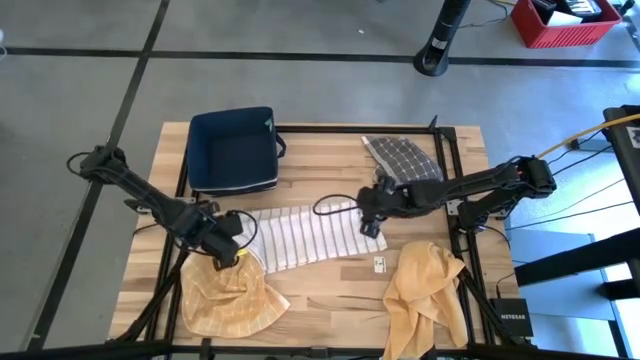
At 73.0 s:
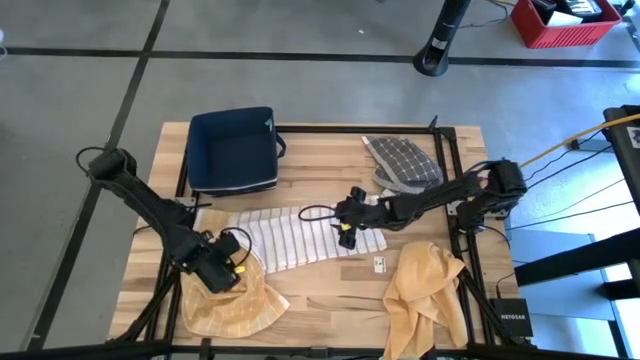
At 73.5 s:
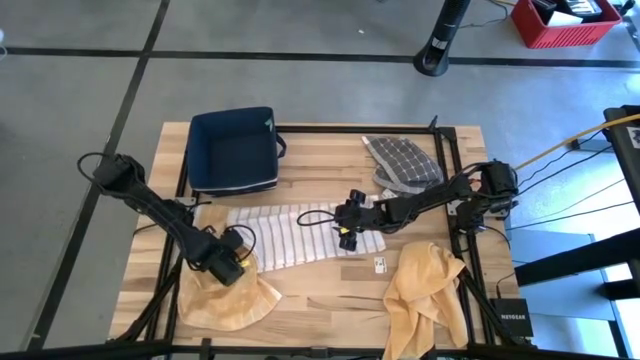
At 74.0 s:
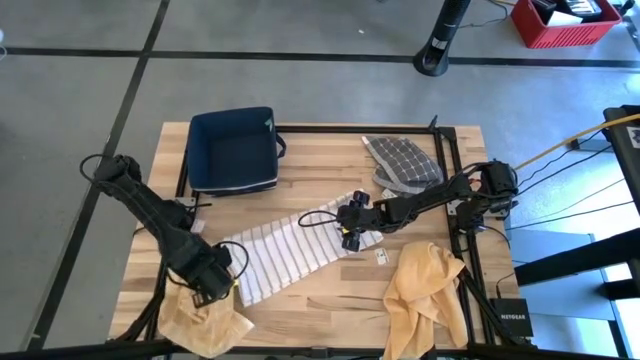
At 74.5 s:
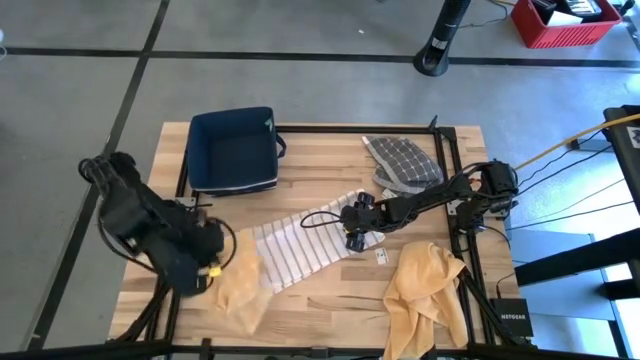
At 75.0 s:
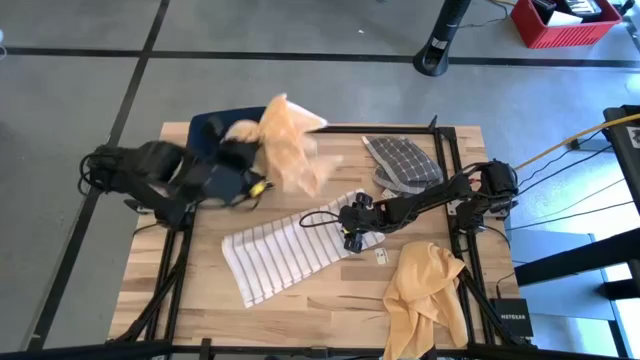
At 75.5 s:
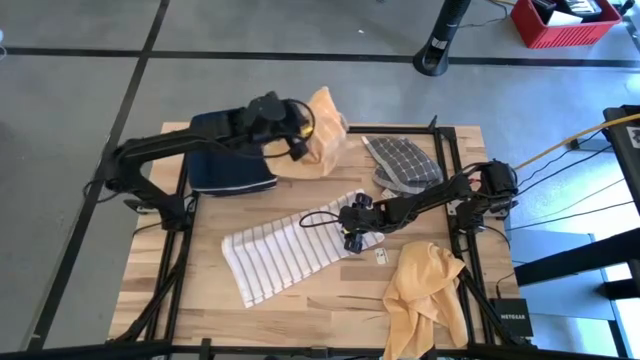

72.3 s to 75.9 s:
Task: Fold towel
Move the orange pattern towel to the top center of the table

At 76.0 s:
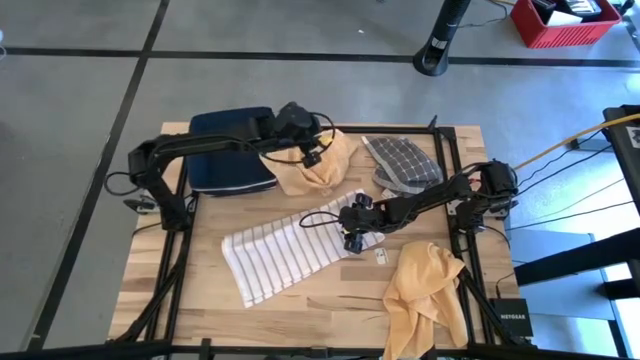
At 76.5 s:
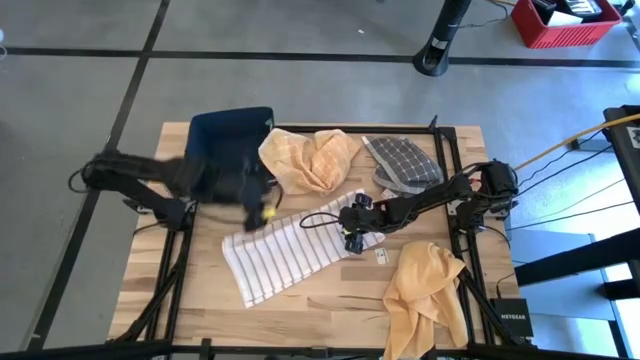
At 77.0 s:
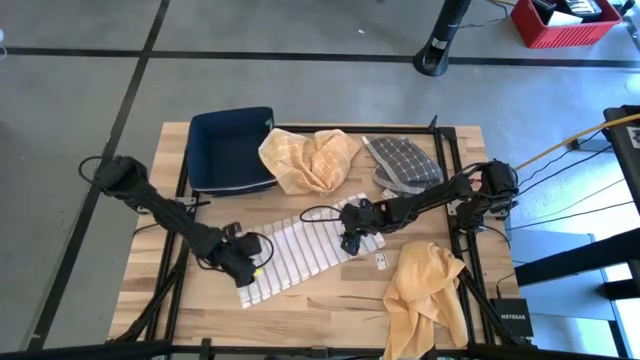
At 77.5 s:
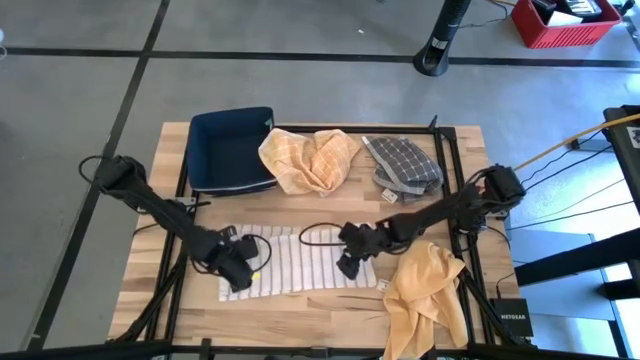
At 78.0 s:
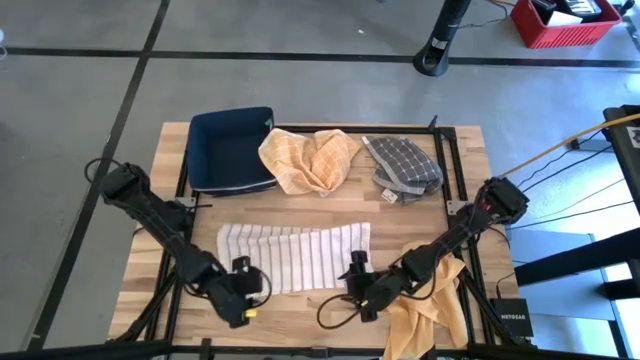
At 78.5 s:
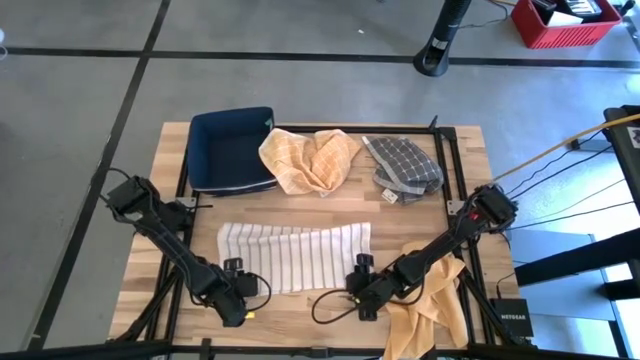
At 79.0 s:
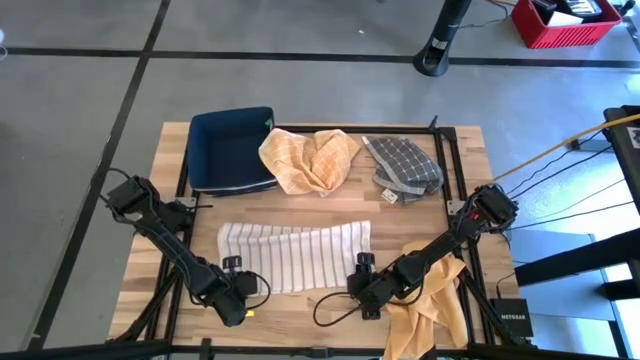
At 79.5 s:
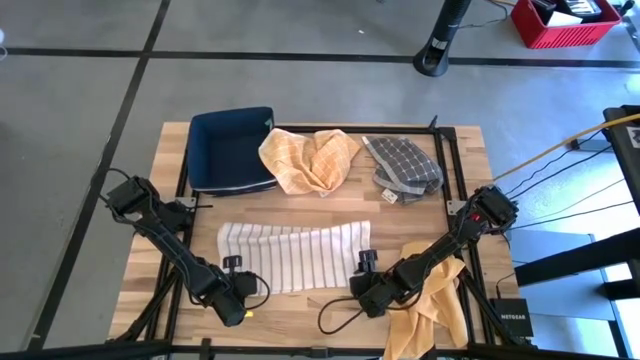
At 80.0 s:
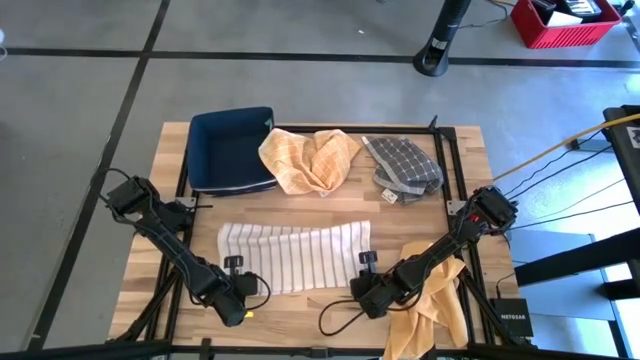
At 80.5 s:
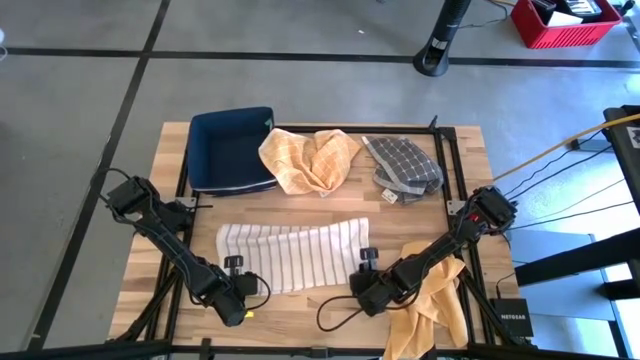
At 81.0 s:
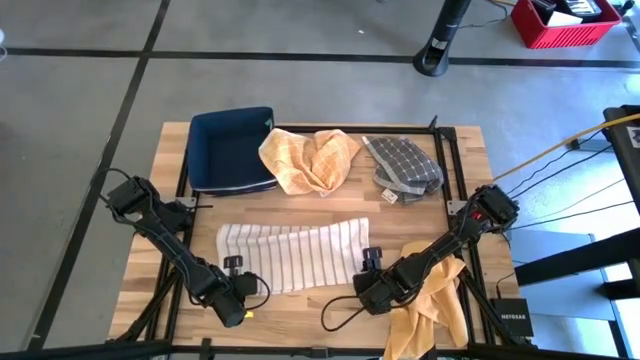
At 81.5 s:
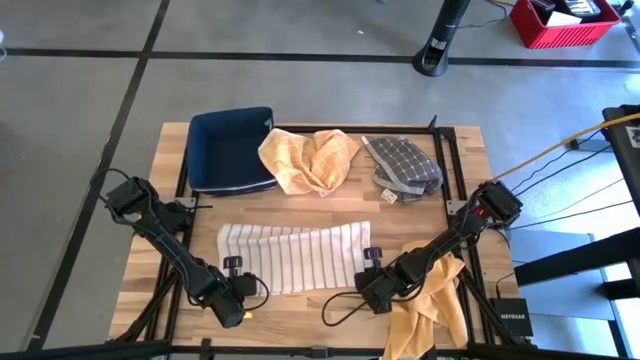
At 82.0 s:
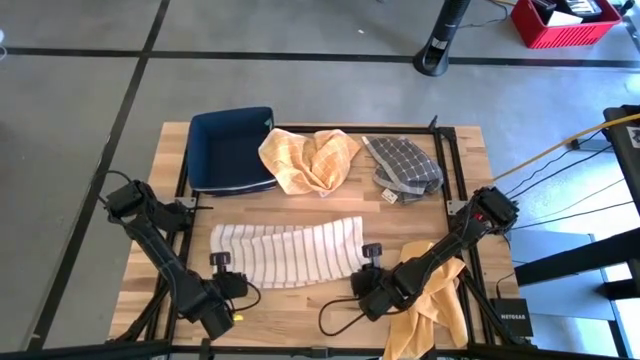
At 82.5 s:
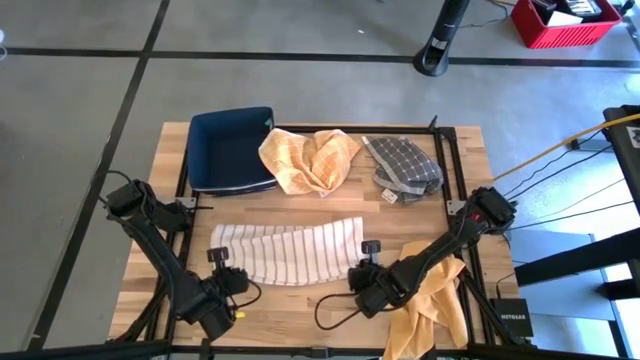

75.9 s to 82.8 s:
Fold the white towel

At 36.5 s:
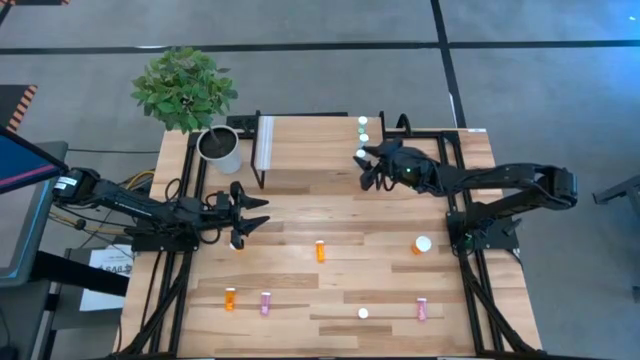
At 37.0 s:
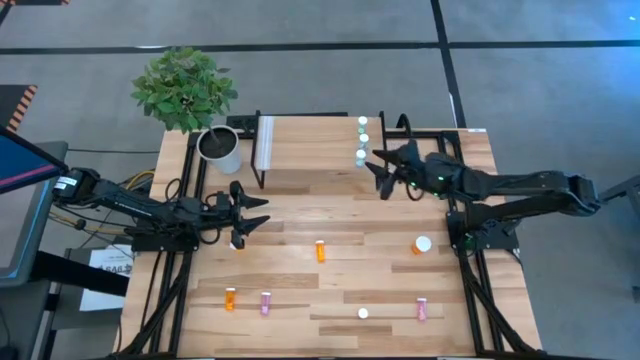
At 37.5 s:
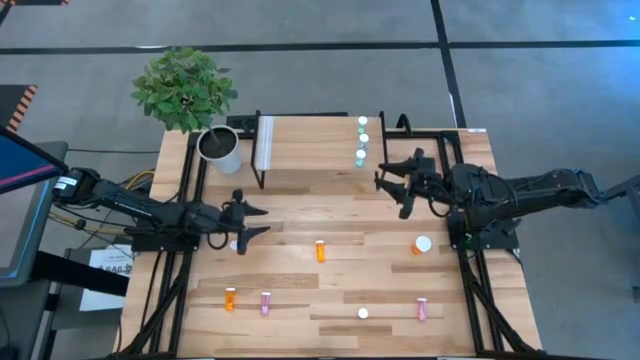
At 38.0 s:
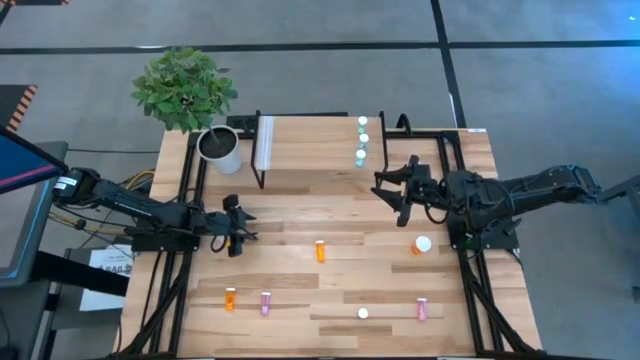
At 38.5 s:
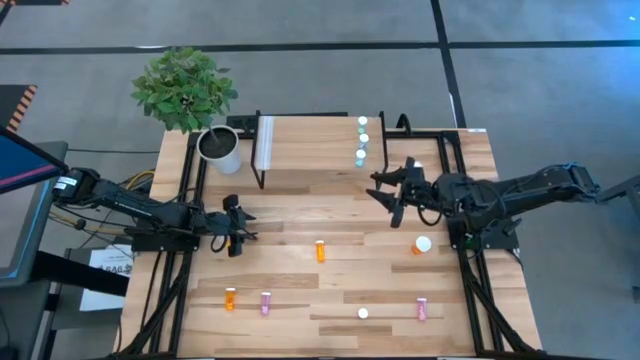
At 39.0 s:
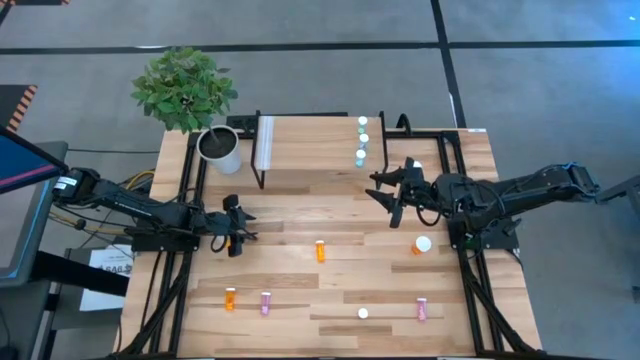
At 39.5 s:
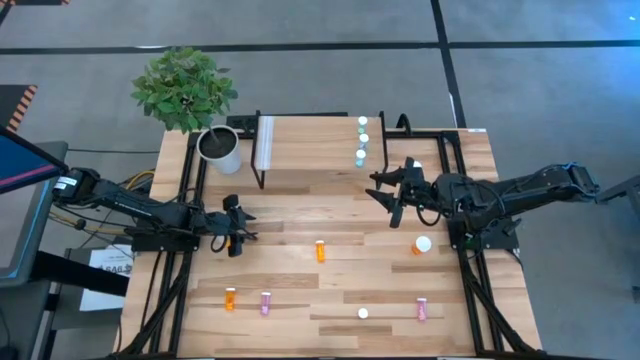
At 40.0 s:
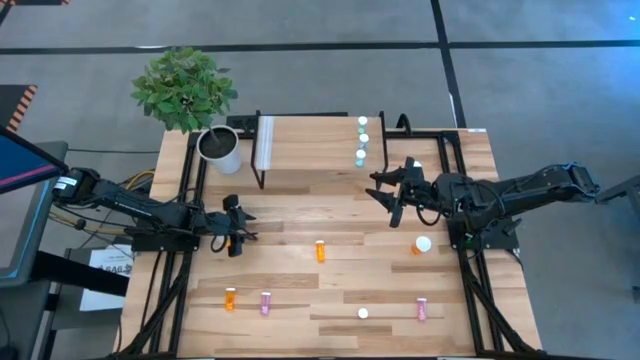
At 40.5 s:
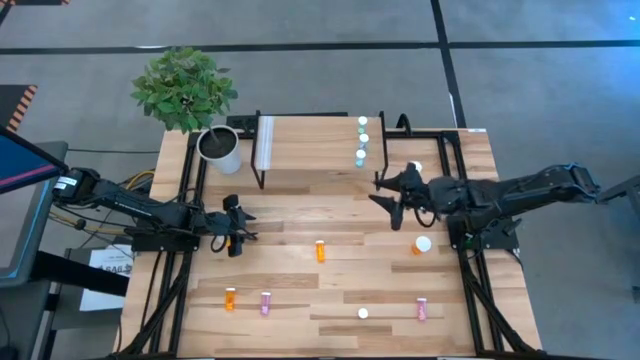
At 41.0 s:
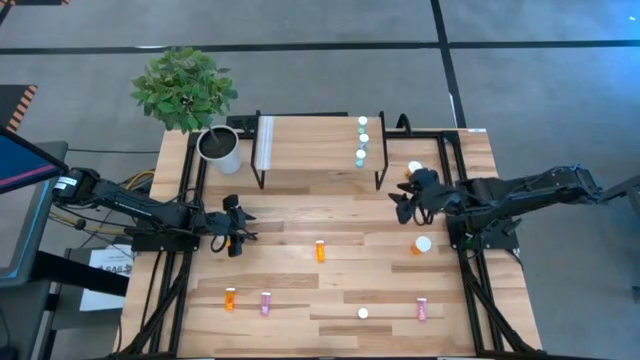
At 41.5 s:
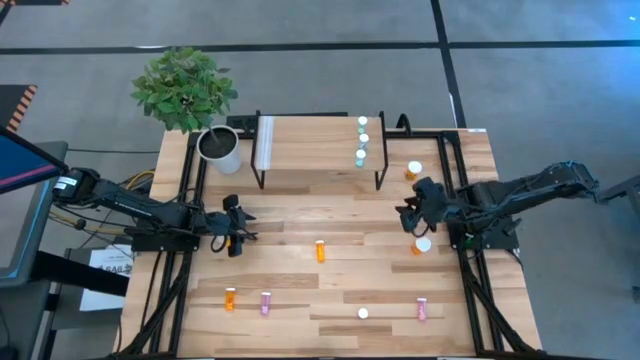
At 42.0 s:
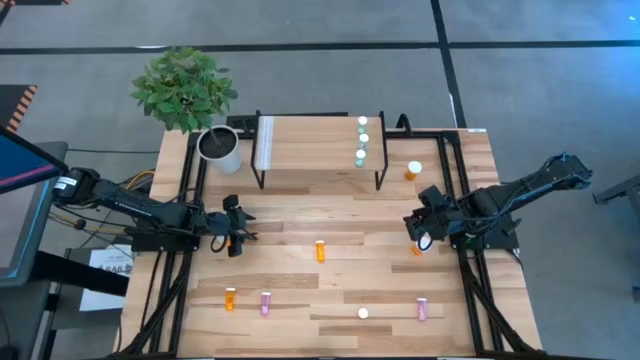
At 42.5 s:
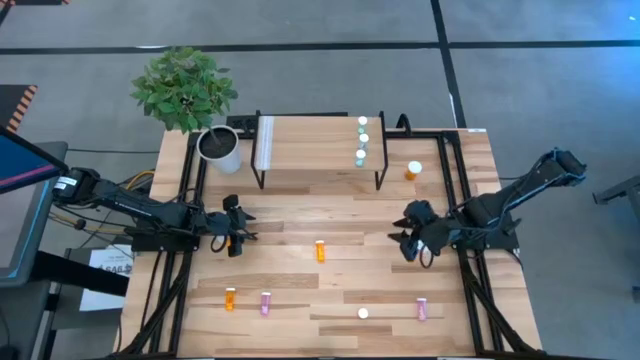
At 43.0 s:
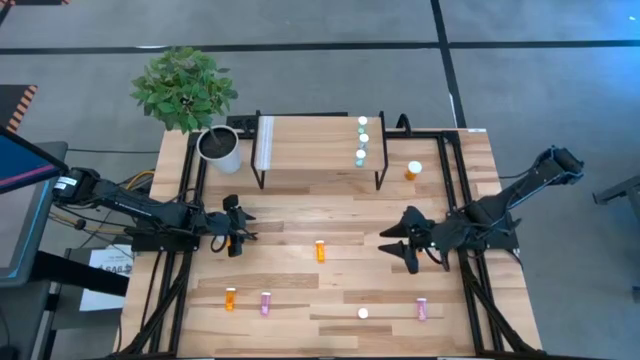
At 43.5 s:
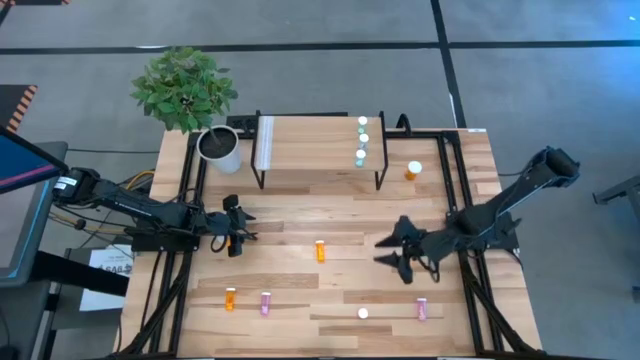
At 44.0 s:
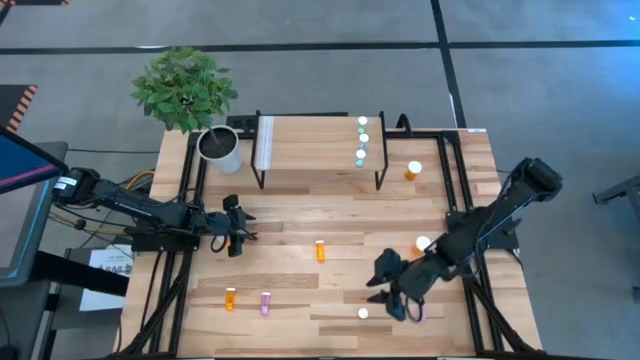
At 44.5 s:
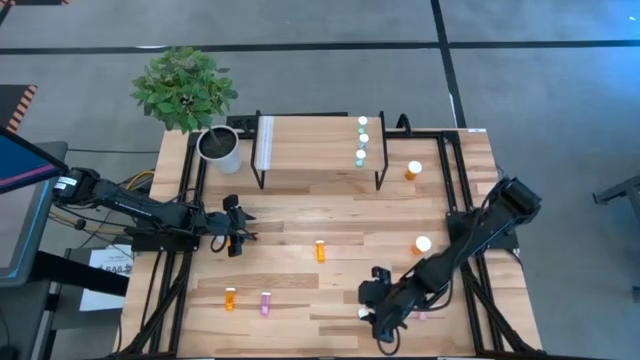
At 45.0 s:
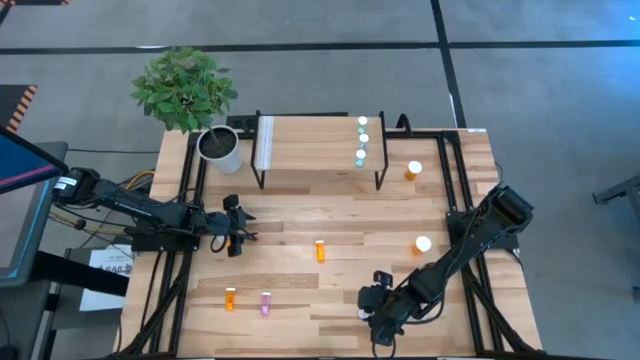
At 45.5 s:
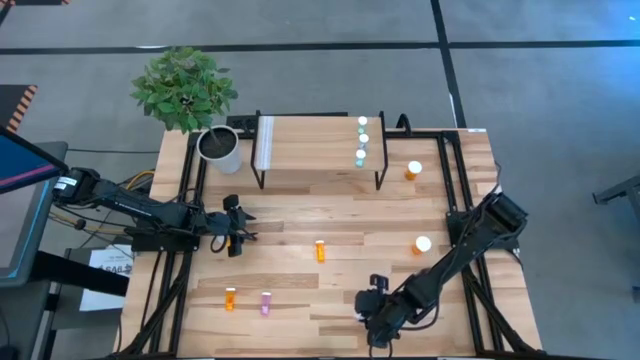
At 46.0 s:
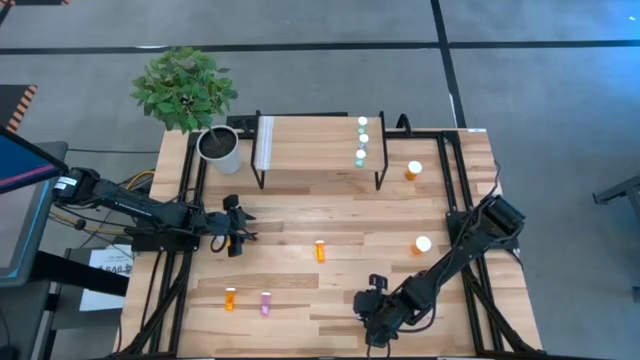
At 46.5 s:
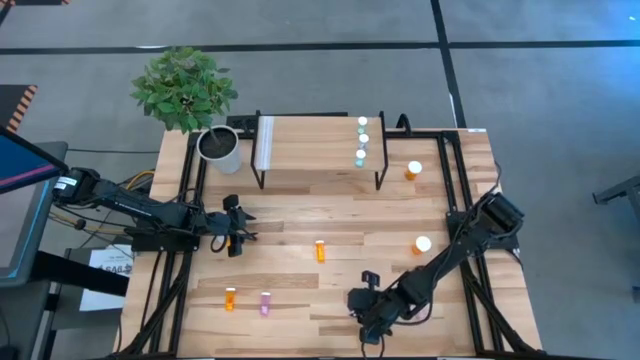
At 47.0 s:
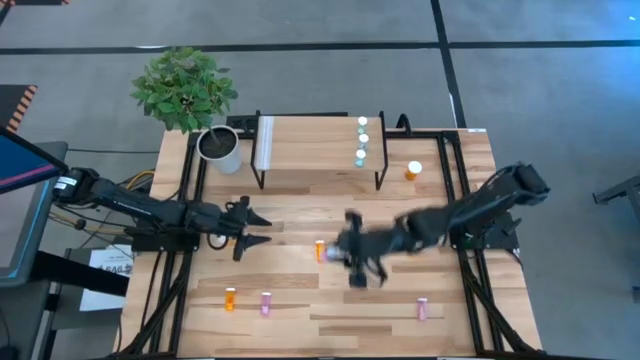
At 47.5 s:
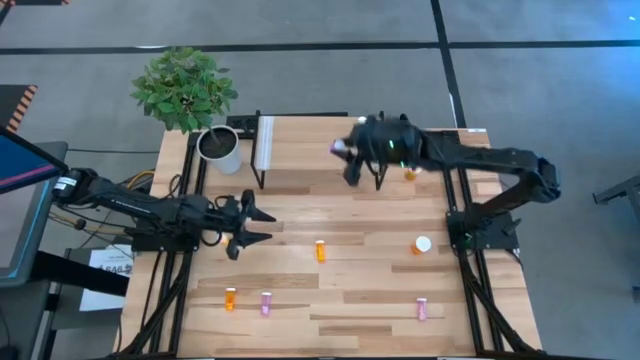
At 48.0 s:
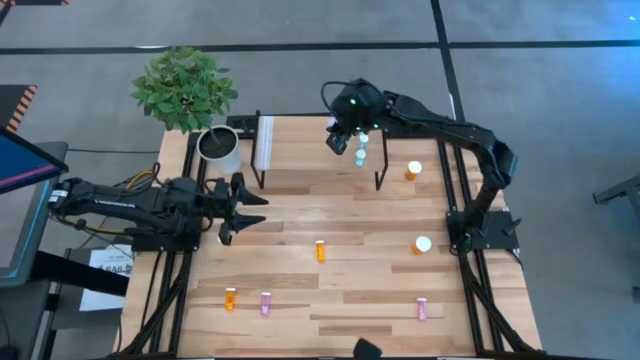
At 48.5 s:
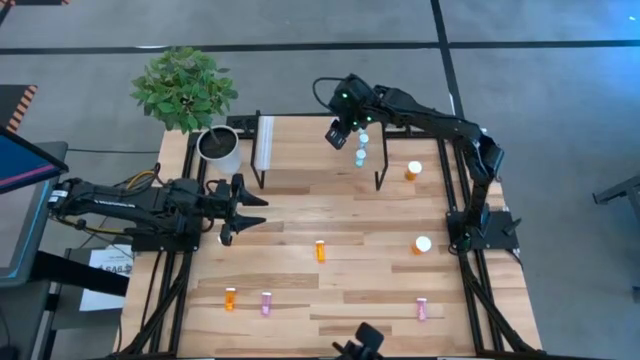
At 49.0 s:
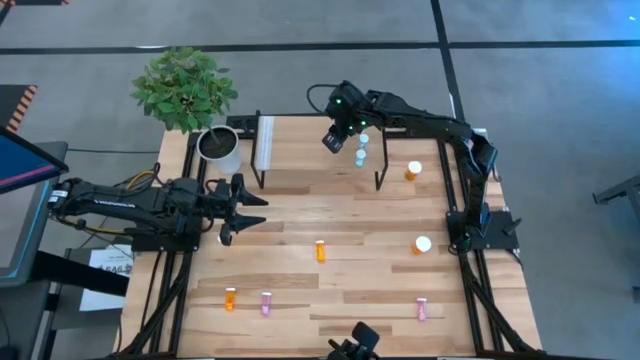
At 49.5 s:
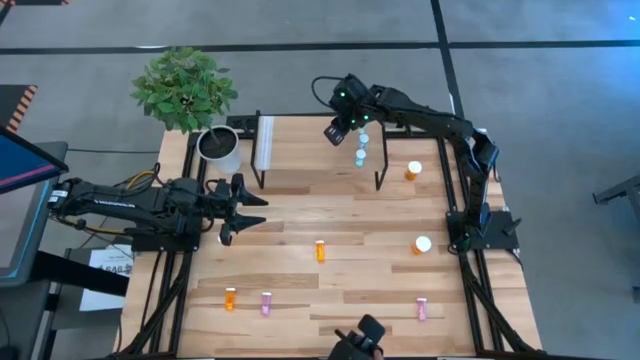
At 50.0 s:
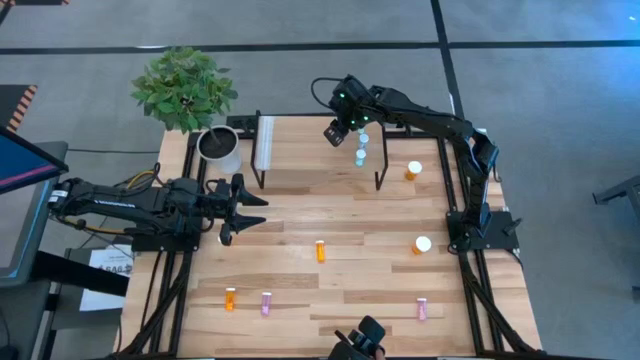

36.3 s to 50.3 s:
Task: Pick and place medicine bottles onto shelf by color
Put the middle pink pill bottle on the shelf
